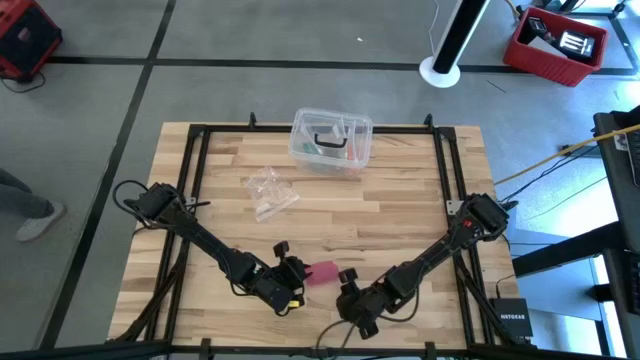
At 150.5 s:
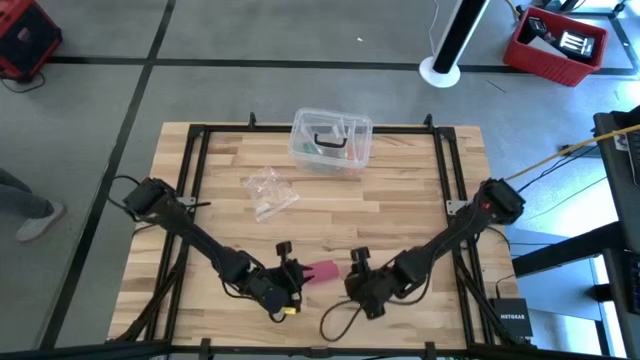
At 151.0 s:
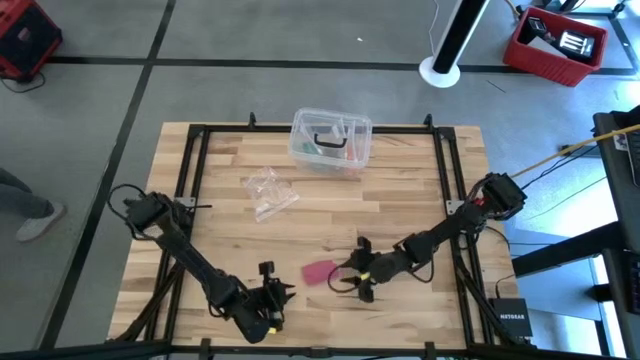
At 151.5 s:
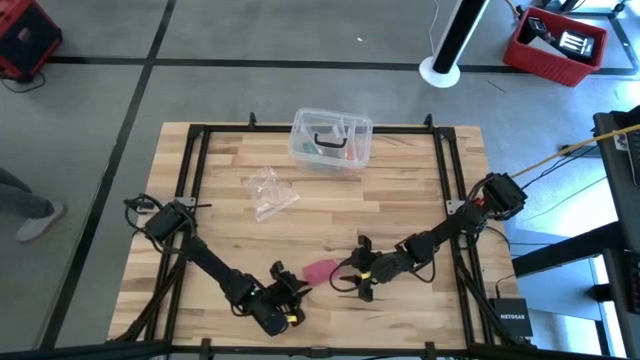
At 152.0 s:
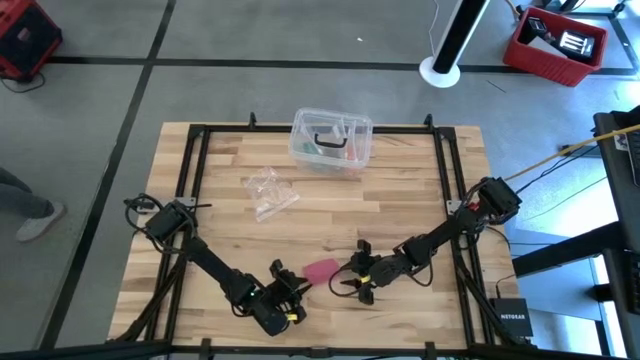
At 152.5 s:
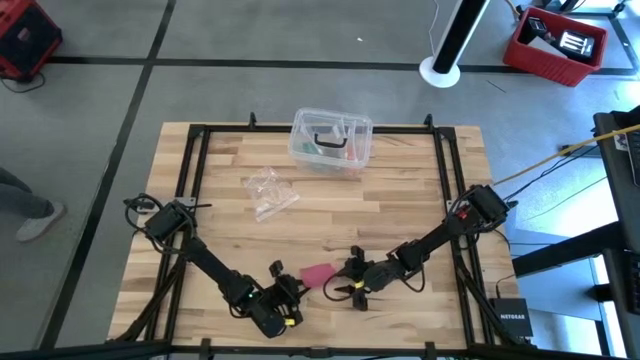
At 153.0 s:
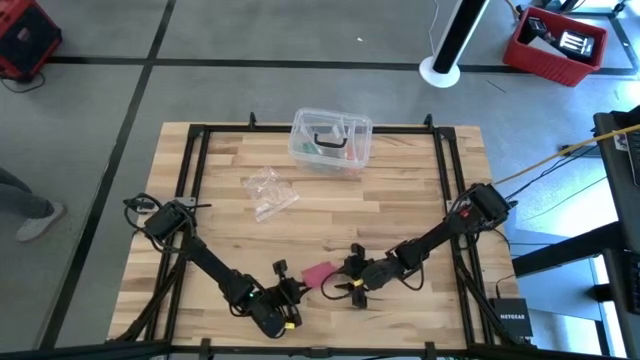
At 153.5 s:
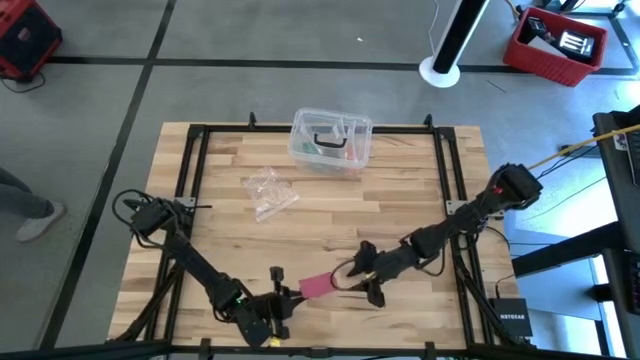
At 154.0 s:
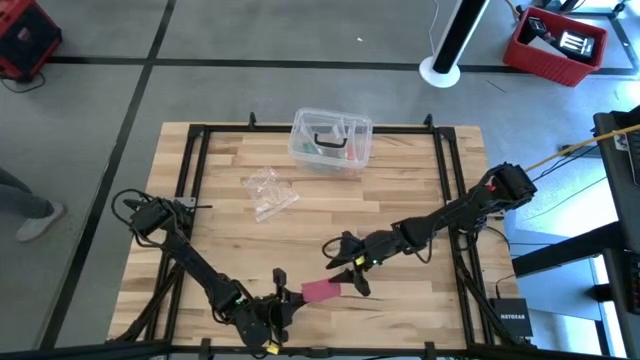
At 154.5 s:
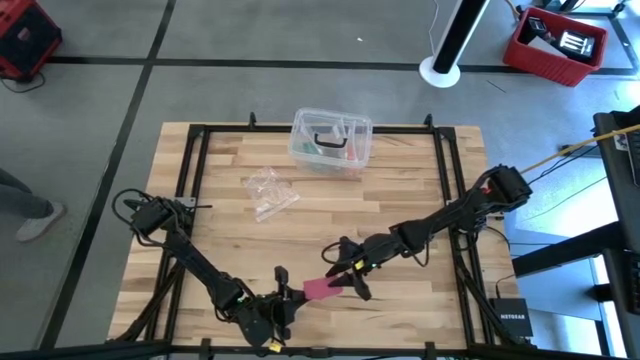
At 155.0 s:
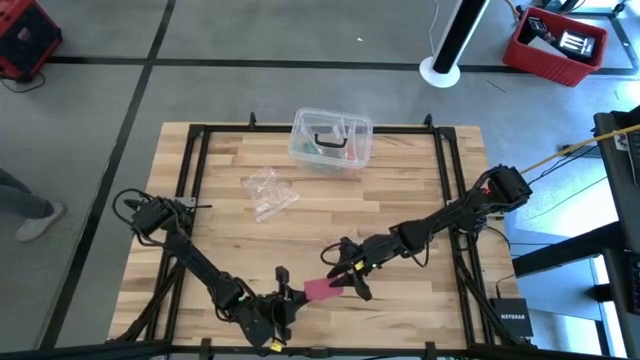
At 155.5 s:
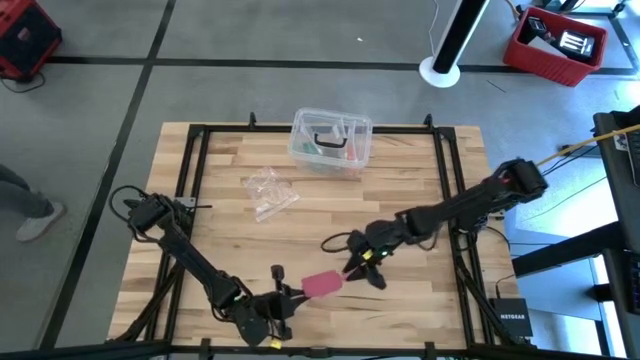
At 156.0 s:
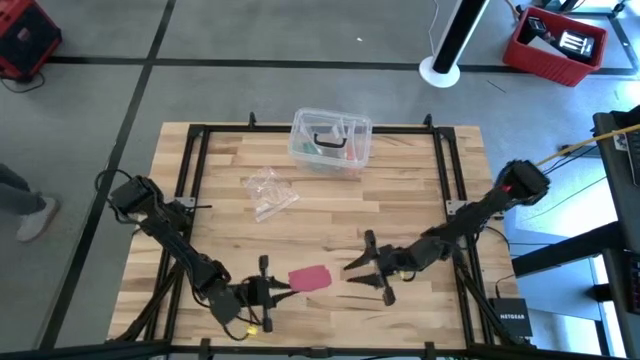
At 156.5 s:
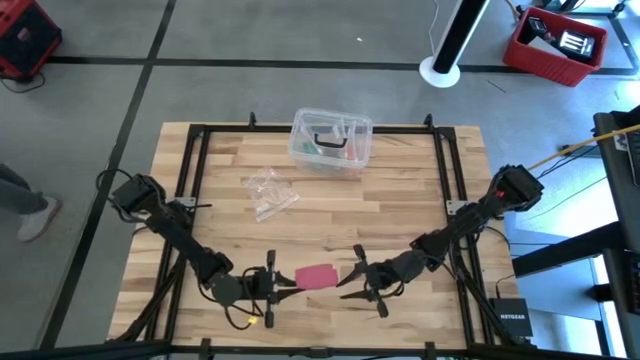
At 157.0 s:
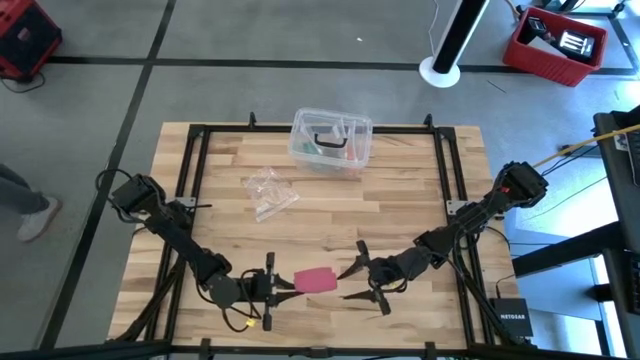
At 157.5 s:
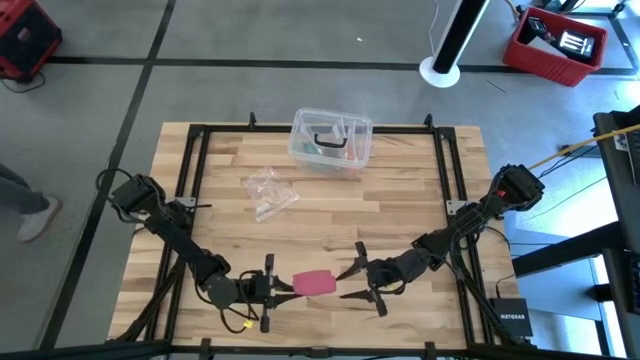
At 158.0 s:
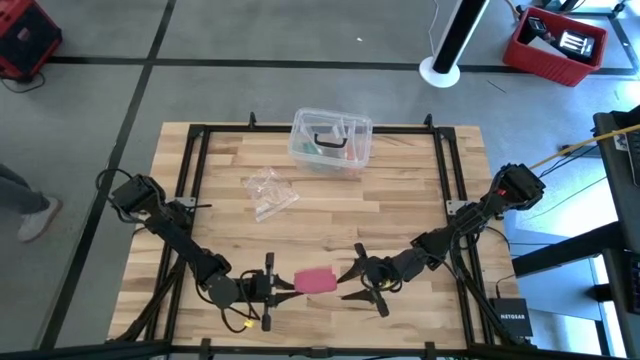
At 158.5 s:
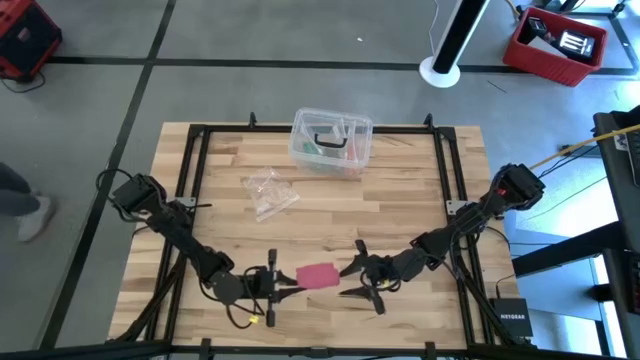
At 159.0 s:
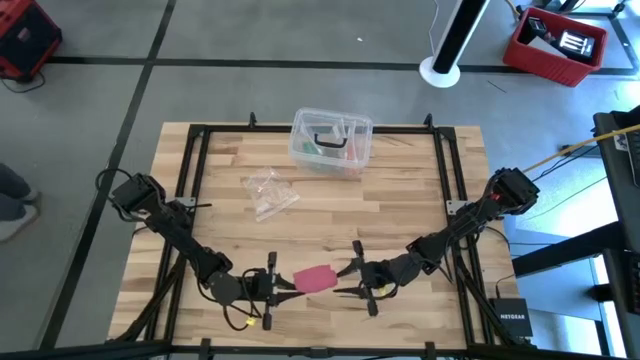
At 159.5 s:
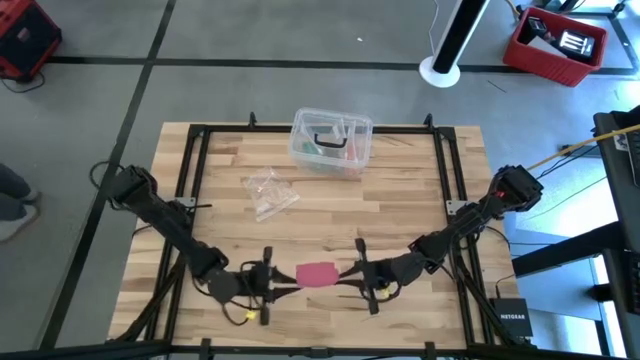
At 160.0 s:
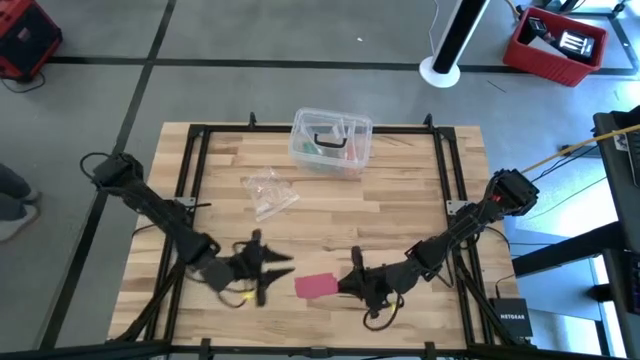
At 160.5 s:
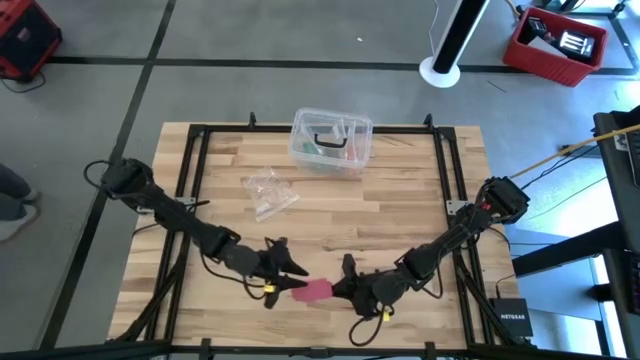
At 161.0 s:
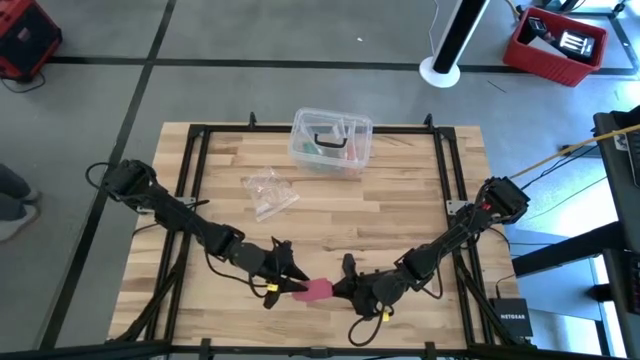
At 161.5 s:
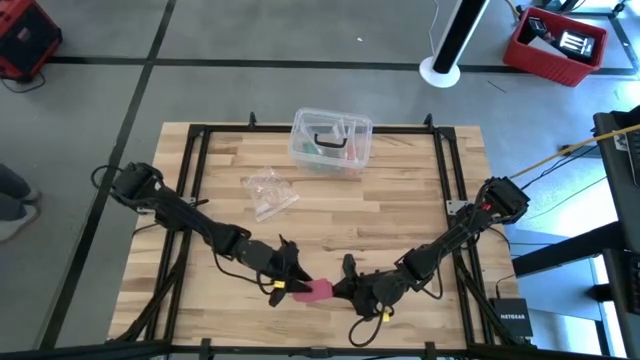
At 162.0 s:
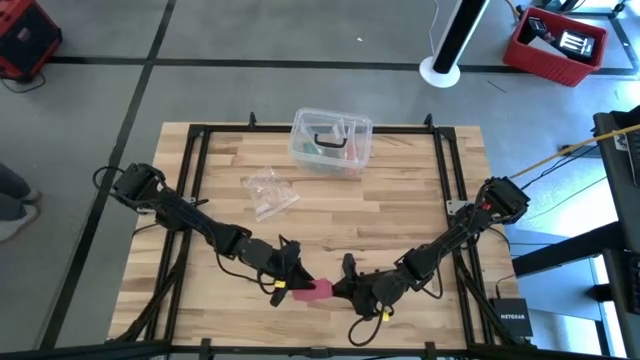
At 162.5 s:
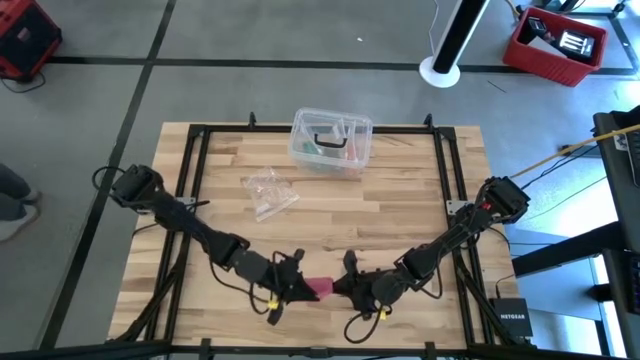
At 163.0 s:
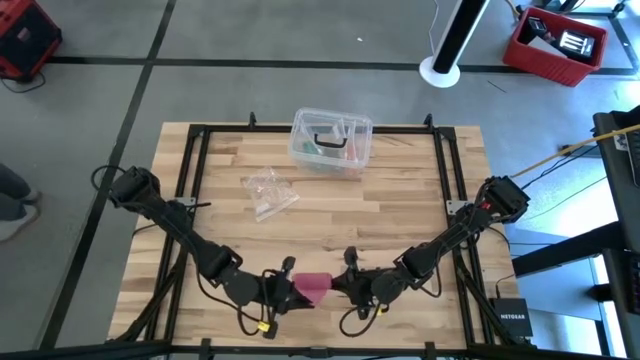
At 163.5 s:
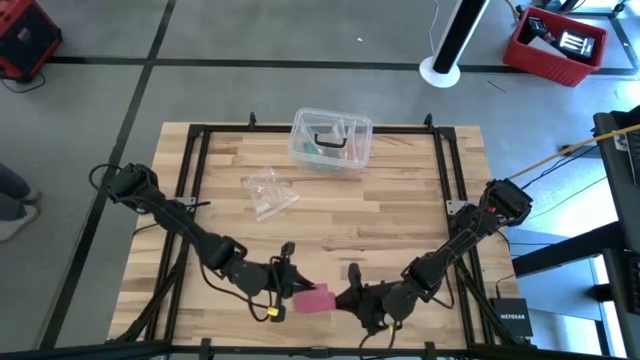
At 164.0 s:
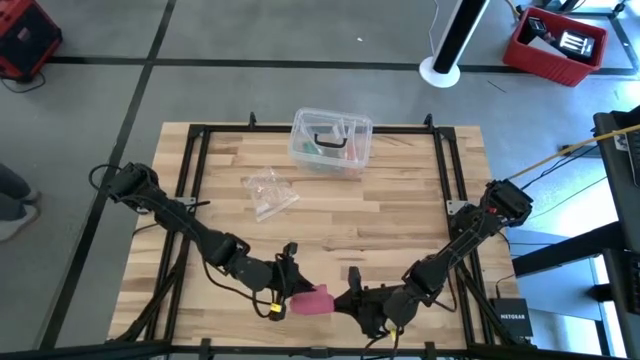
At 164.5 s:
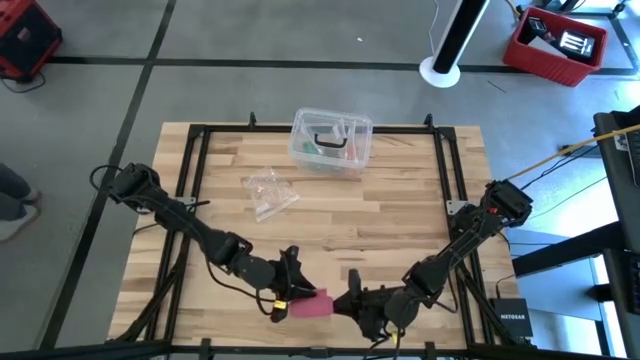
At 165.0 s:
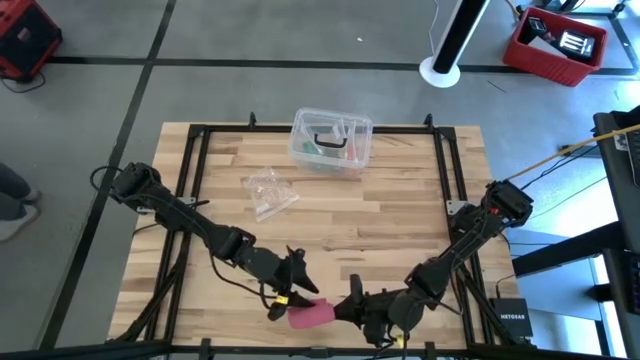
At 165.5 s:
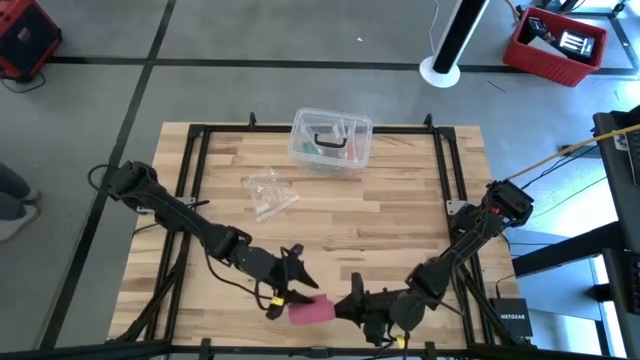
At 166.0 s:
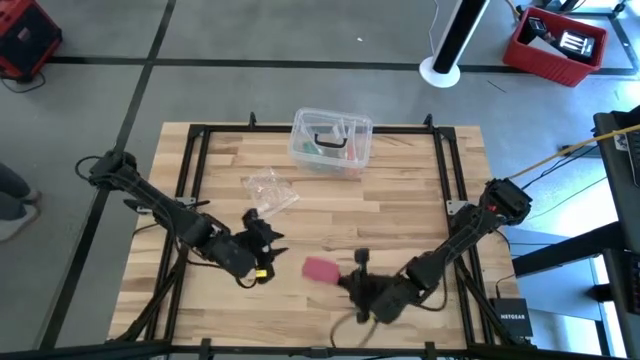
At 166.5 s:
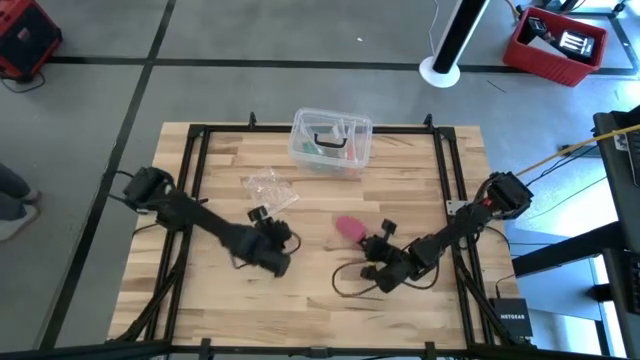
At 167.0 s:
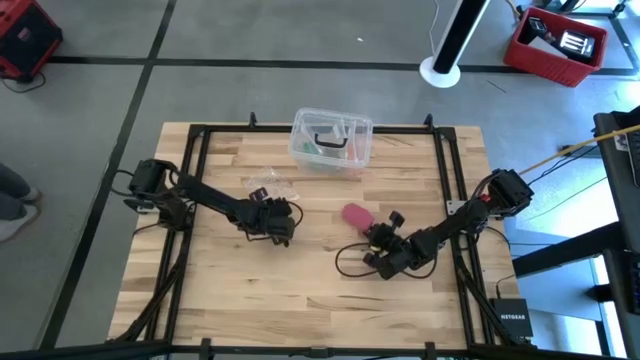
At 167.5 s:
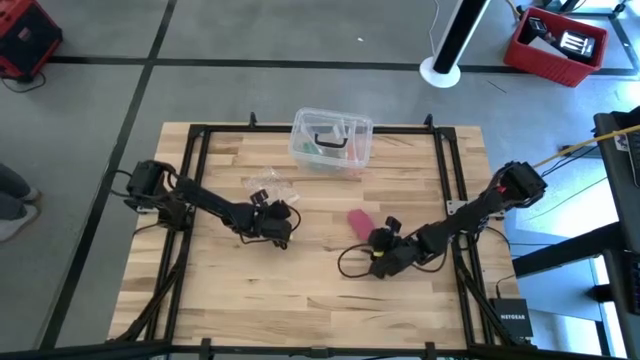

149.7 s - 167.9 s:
Task: Roll bandage
Roll the pink bandage

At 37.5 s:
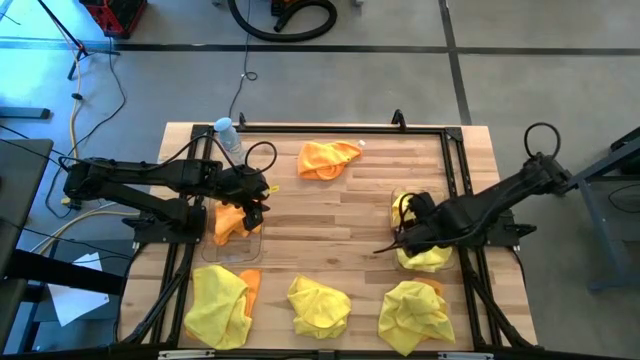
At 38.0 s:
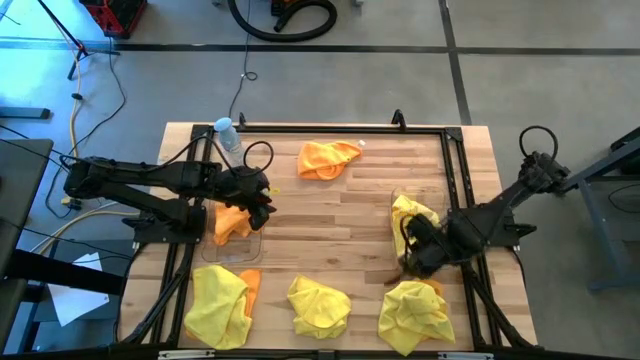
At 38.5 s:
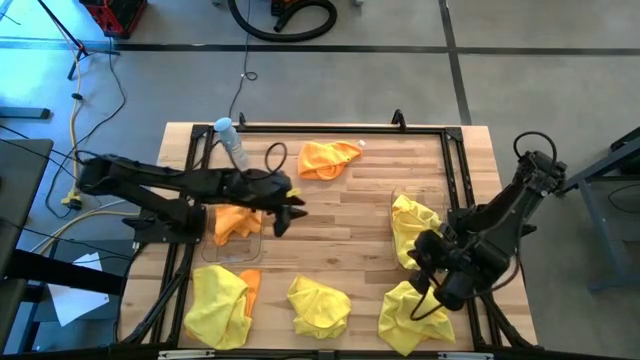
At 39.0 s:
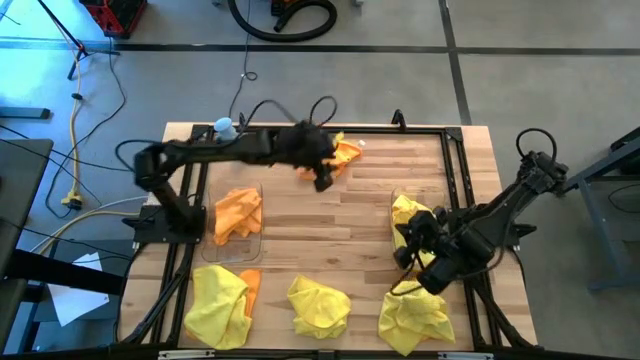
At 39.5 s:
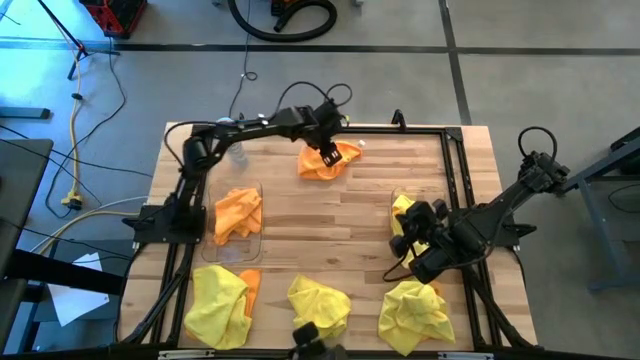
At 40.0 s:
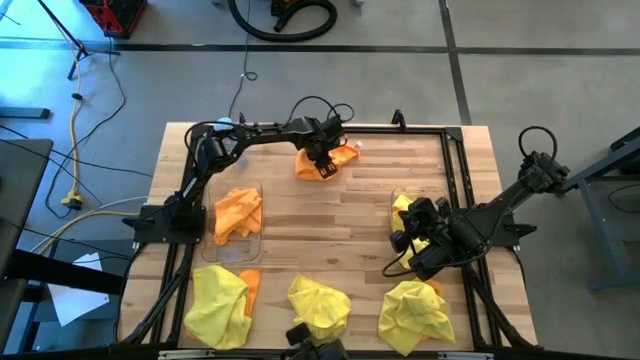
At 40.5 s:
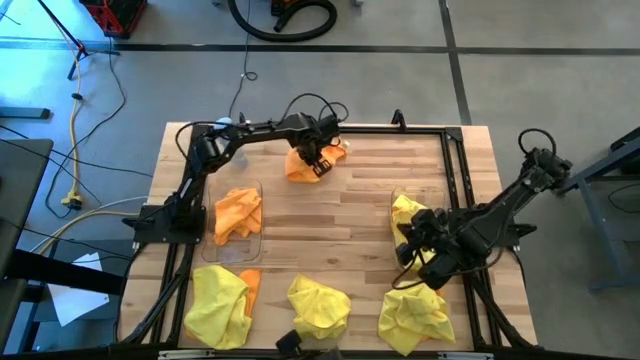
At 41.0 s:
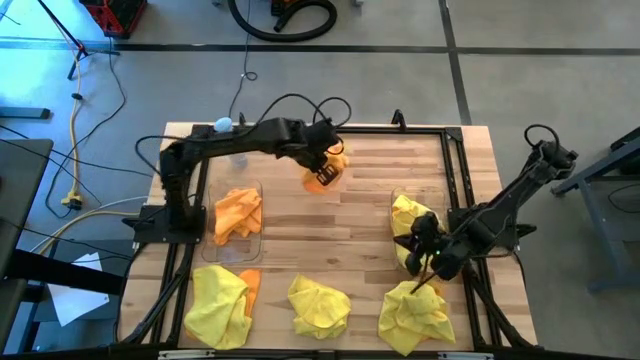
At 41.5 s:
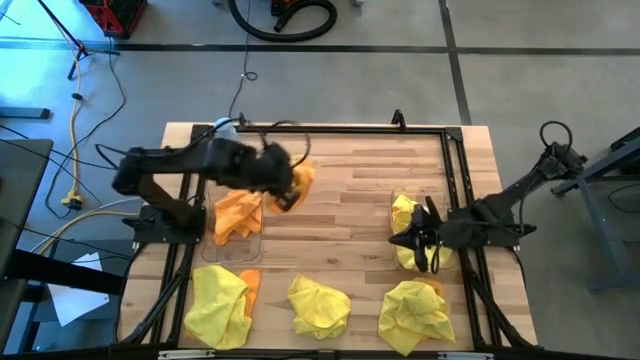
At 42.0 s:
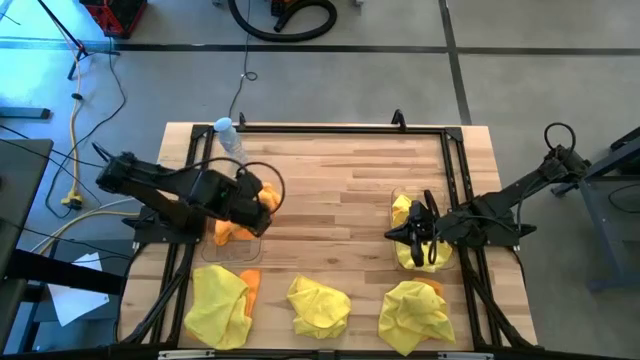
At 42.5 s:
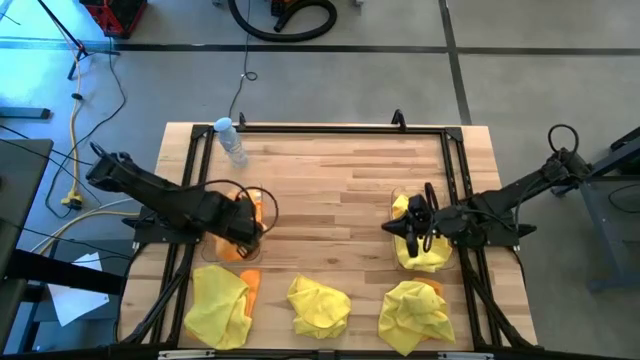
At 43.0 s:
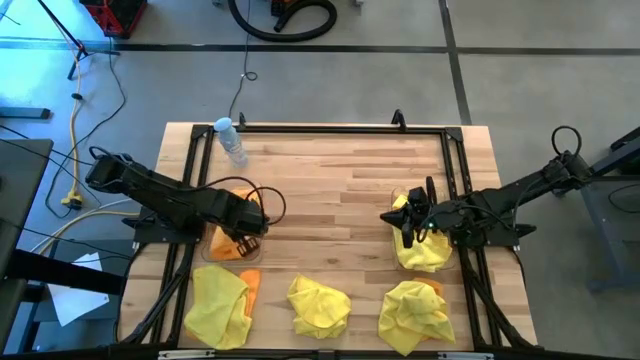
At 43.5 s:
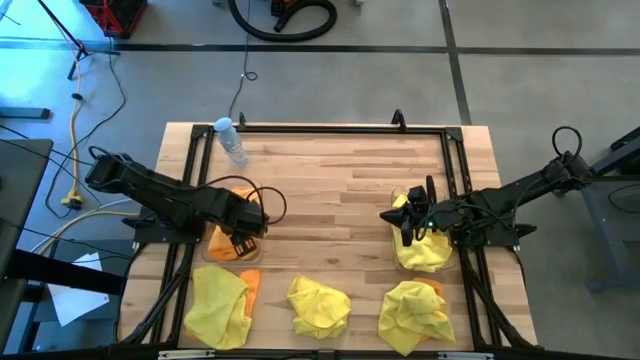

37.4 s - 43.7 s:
Task: Sort microfiber towel by color & place in baskets
Put the orange towel into the left transparent bin
